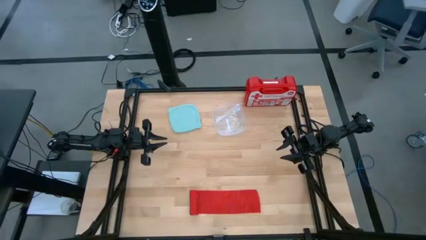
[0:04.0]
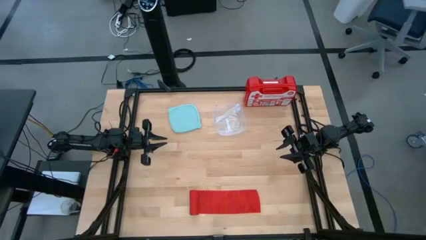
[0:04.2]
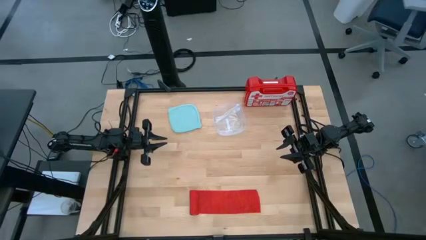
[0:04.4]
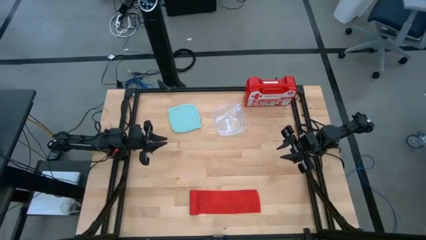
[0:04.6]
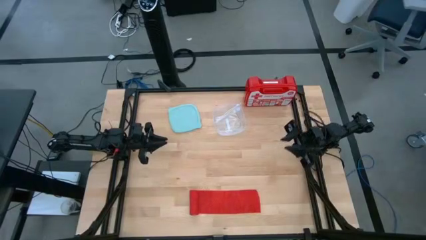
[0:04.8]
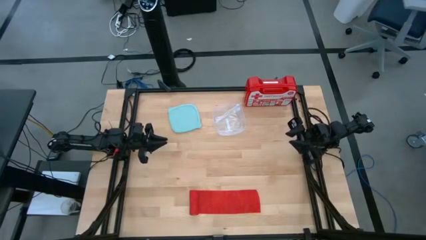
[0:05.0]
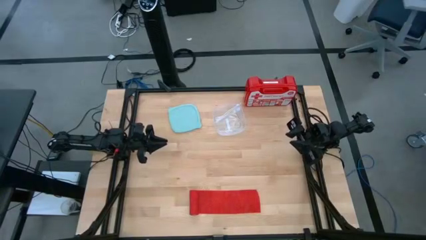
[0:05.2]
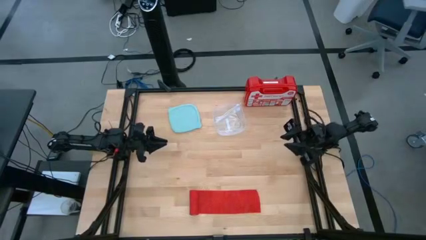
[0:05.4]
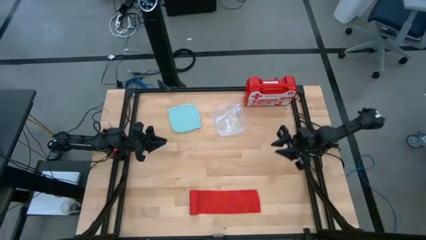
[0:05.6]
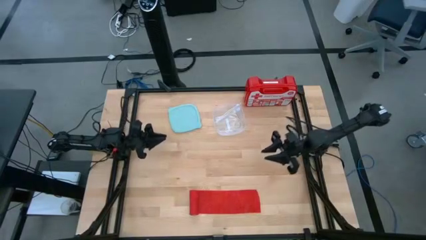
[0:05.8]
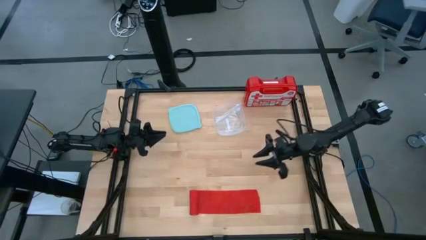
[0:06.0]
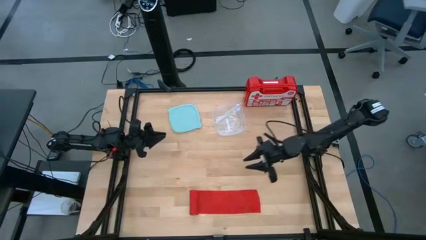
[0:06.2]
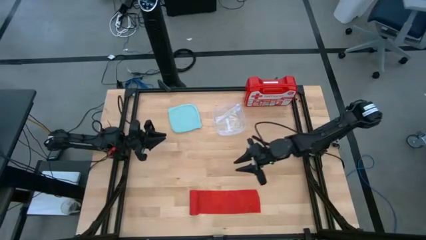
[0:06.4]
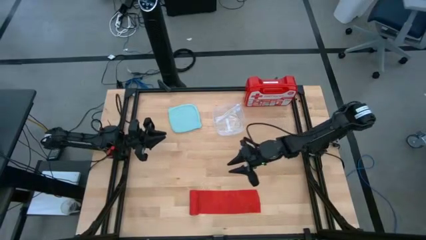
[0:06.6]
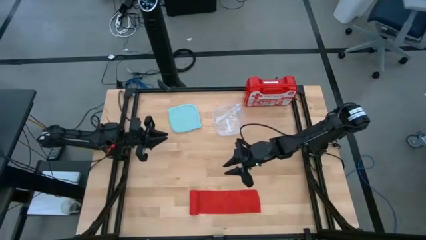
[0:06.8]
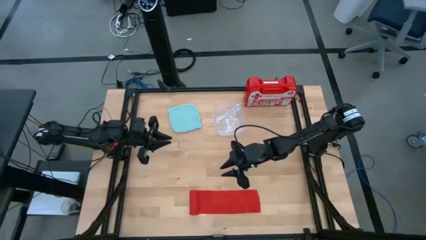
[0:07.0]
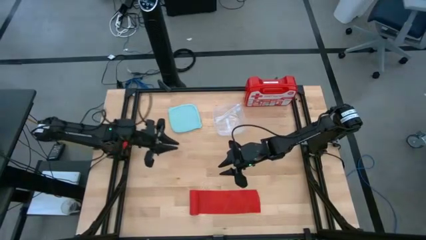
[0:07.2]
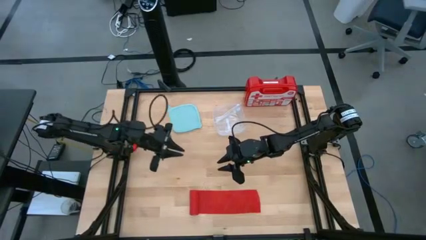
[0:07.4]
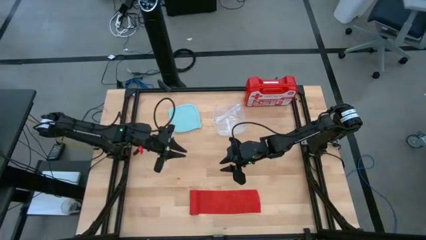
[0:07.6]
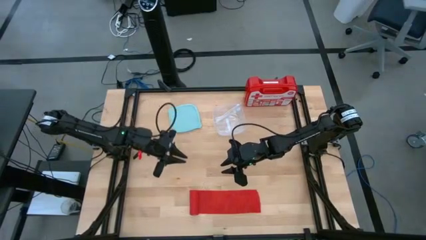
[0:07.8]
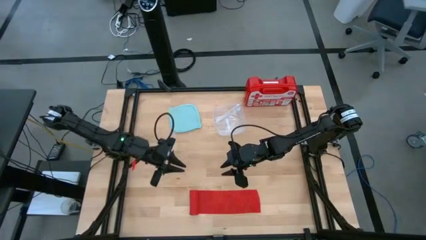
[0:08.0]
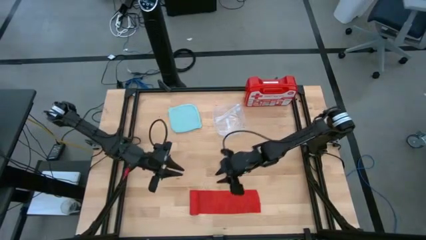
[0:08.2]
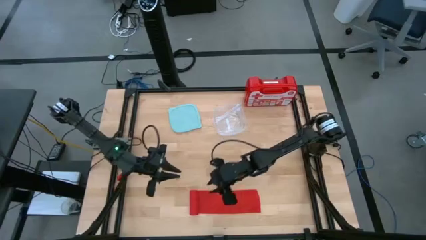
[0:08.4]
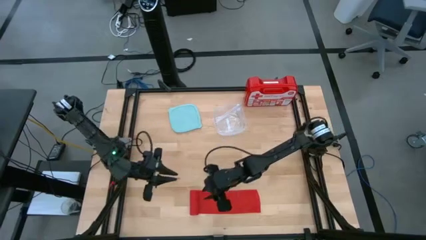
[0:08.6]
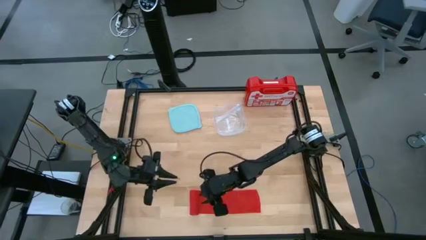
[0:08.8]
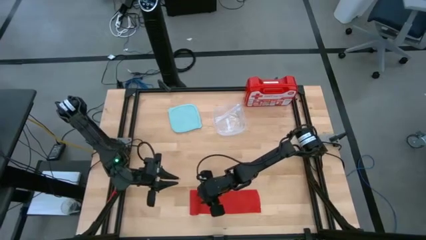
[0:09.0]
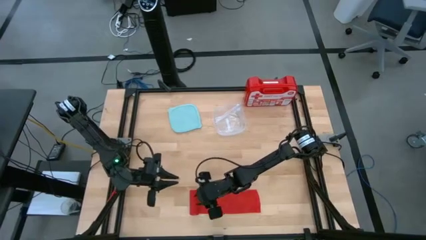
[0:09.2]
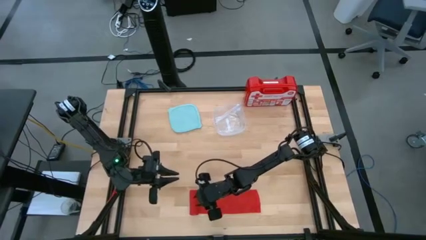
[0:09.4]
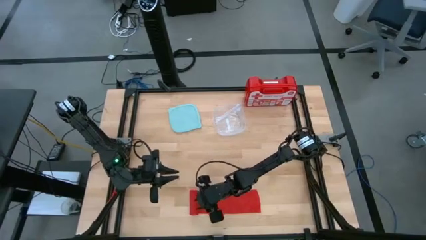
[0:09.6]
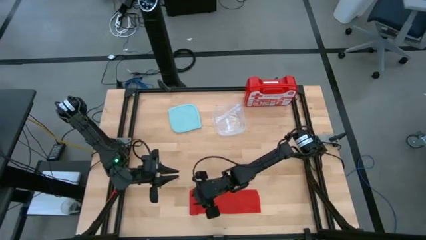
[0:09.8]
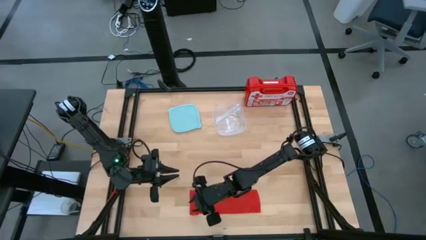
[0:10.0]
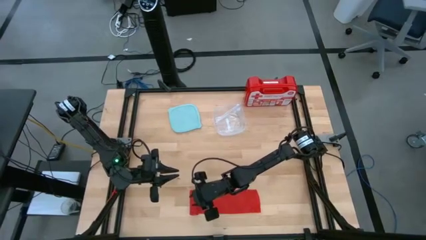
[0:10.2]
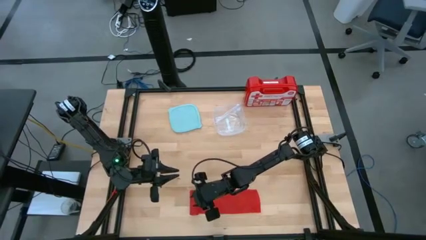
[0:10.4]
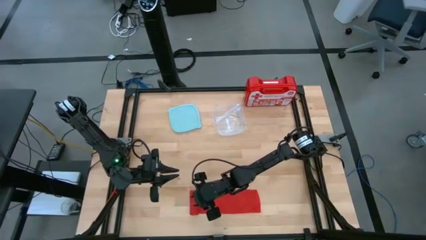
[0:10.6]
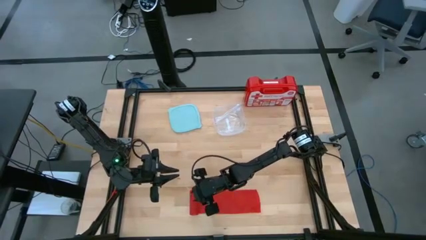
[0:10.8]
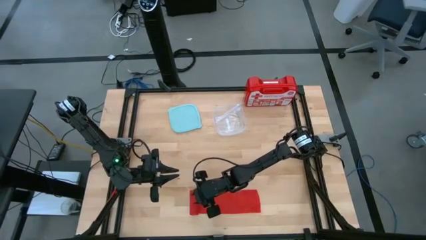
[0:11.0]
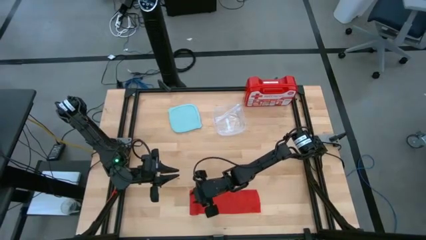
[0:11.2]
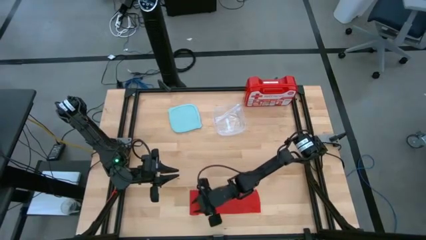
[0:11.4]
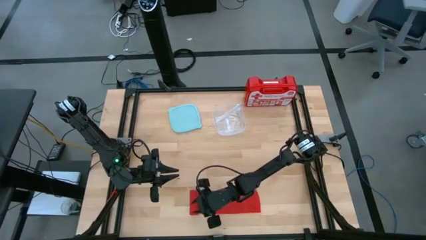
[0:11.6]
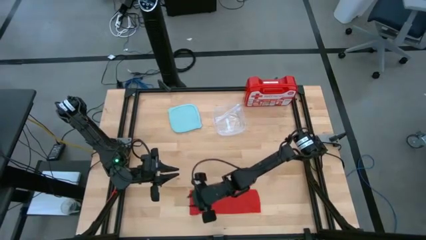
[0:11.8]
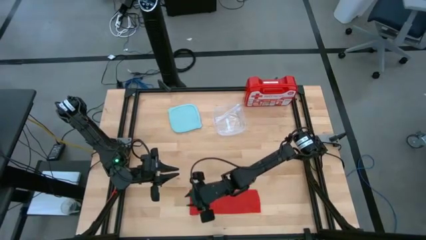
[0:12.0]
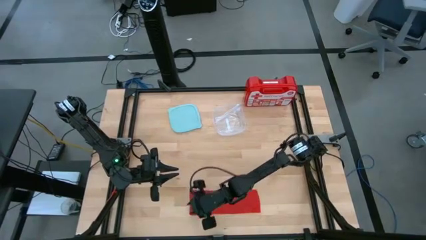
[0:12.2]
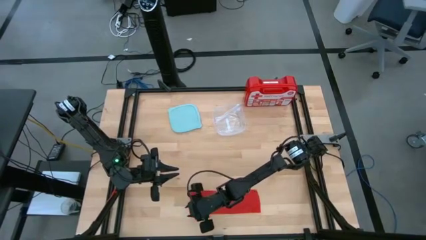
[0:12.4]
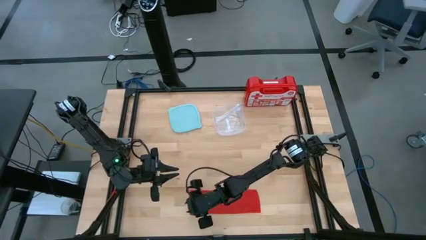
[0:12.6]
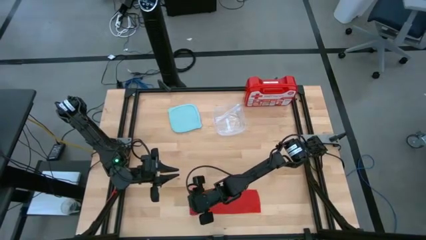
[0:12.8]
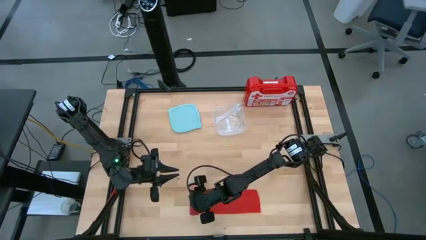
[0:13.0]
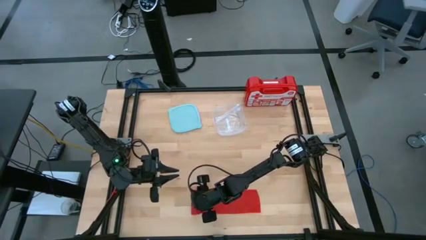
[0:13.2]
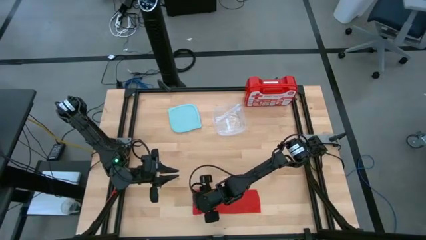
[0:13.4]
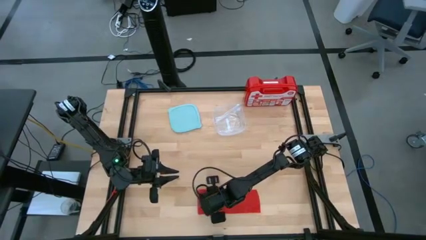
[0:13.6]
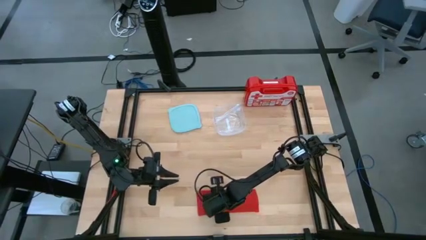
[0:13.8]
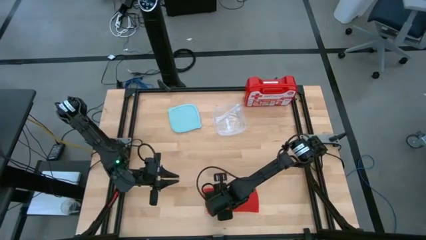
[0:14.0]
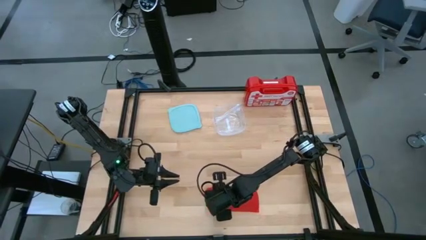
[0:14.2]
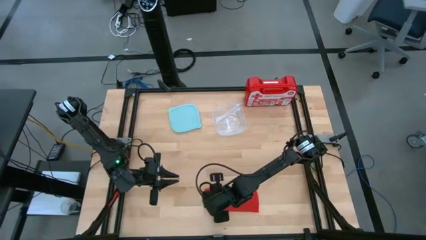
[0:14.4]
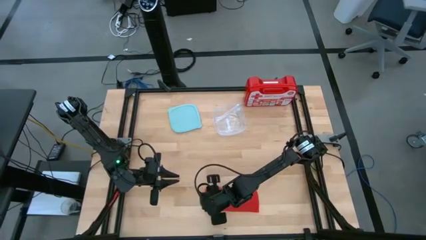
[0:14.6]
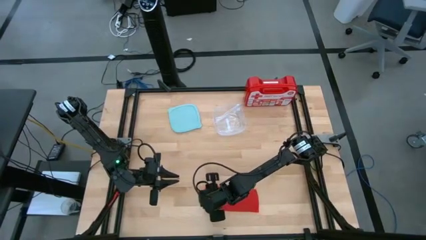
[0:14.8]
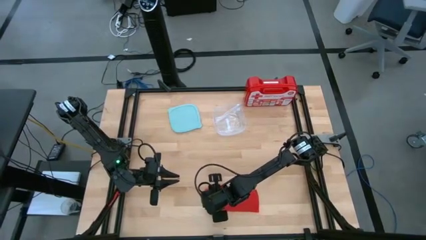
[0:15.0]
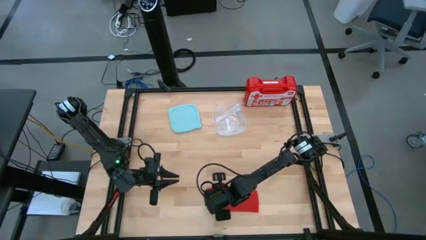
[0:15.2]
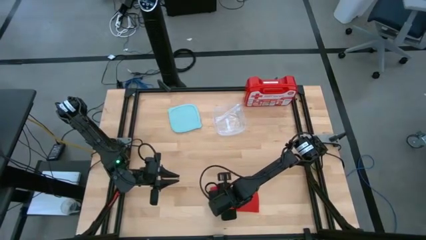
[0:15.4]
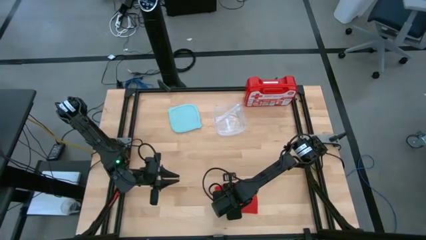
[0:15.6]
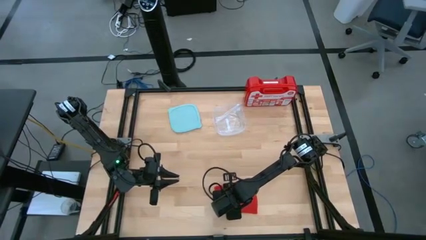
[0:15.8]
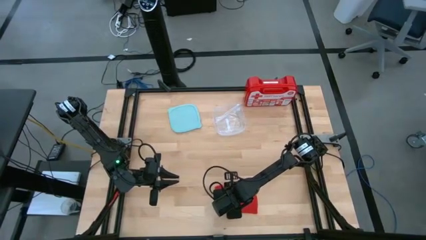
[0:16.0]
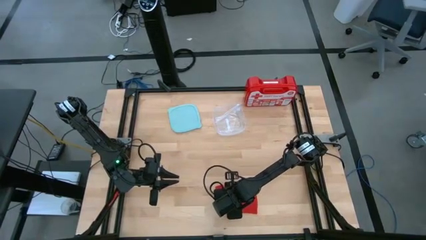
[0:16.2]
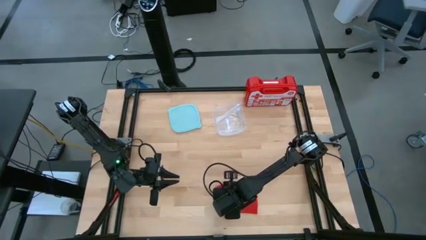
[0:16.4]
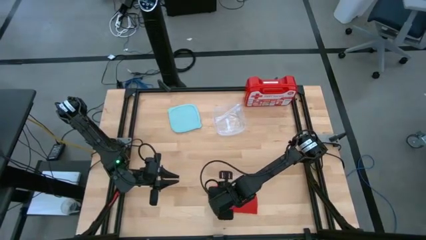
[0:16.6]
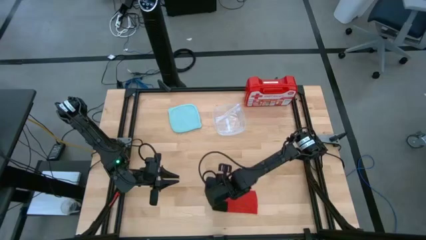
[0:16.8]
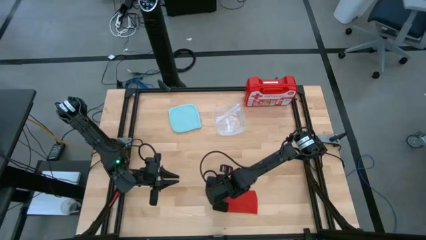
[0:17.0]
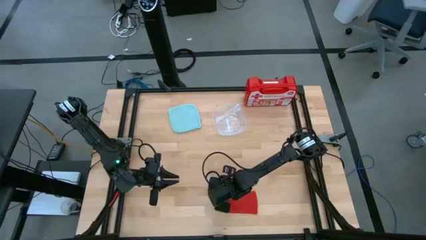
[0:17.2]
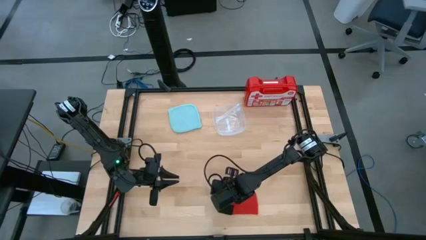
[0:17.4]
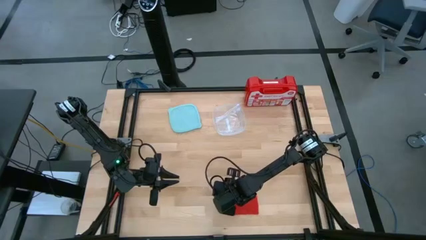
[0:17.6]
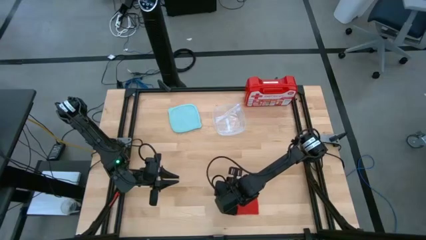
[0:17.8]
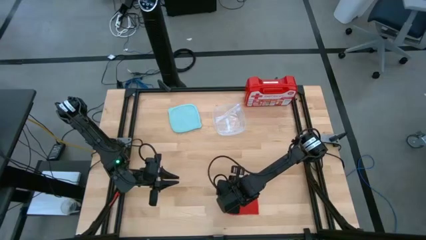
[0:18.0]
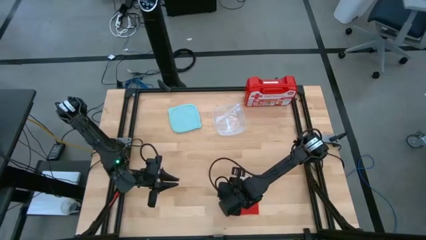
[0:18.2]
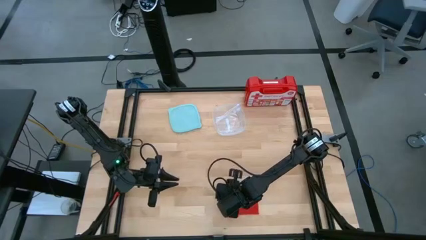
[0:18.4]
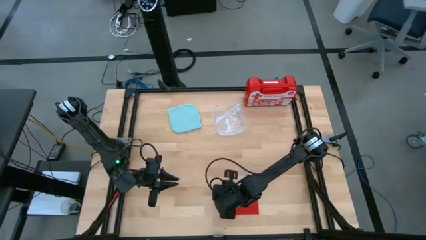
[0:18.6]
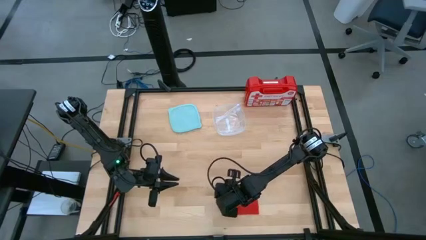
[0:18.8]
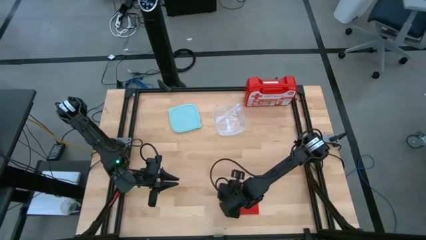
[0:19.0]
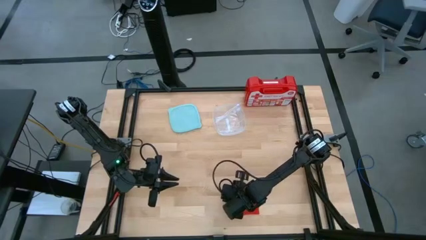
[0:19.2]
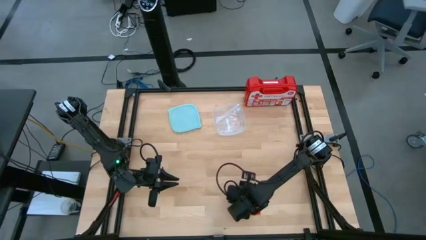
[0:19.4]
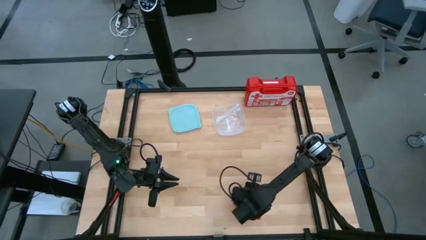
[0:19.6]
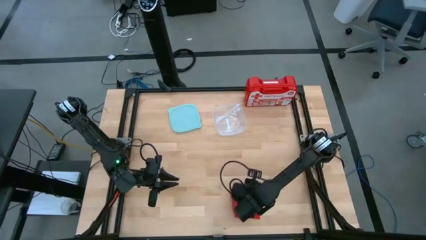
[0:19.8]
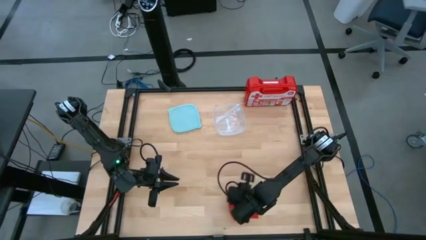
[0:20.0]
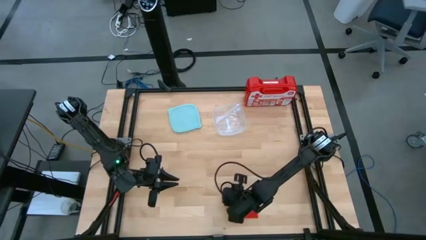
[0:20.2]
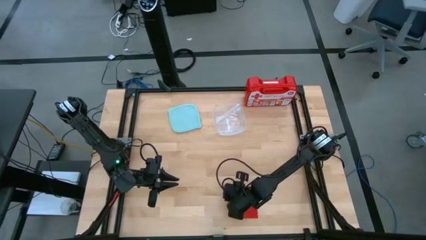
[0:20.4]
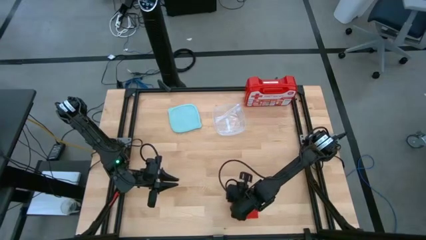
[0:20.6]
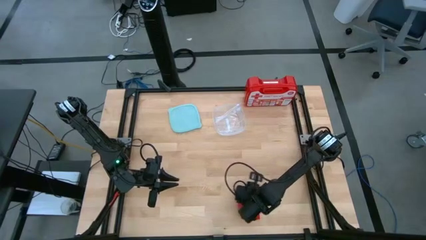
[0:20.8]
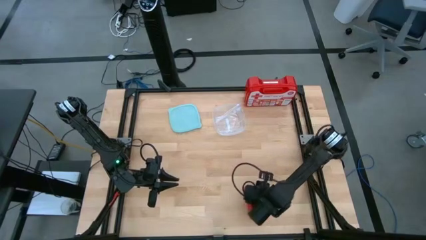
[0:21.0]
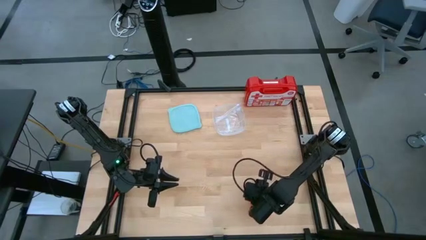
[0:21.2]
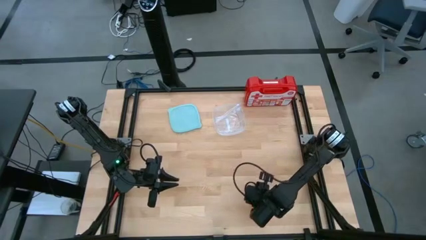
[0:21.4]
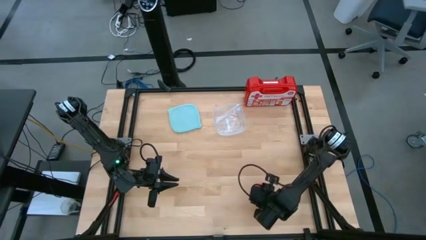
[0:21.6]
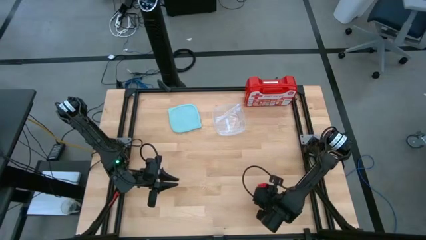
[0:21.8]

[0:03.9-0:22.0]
Task: Roll bandage
Roll the red bandage
